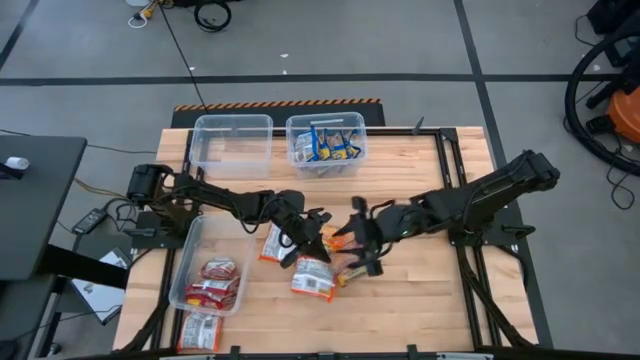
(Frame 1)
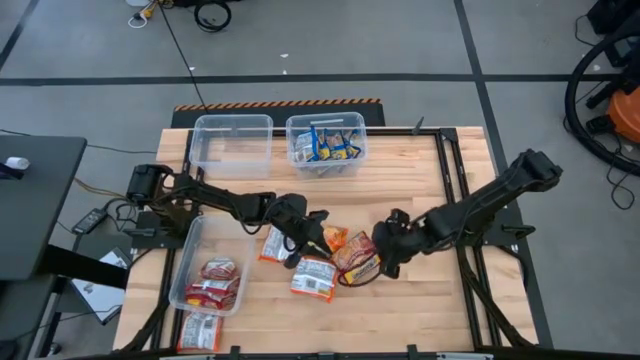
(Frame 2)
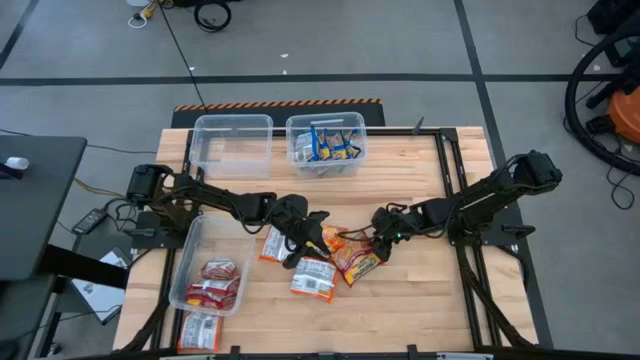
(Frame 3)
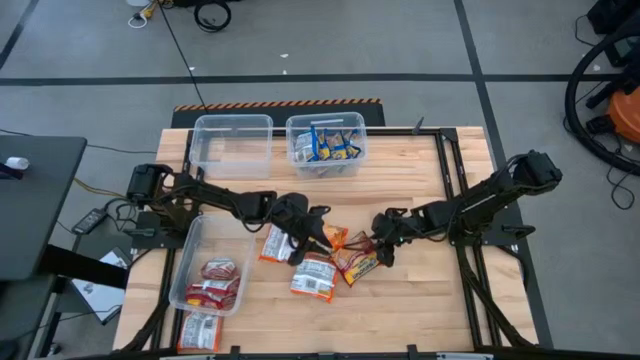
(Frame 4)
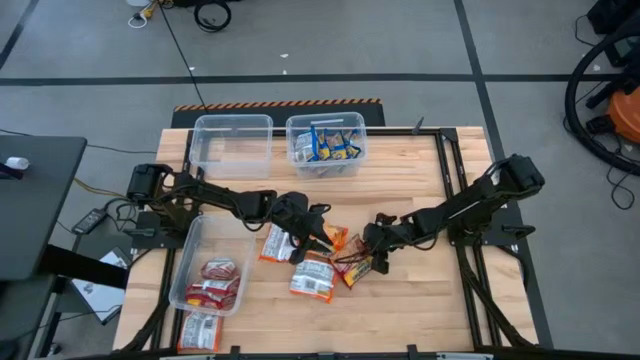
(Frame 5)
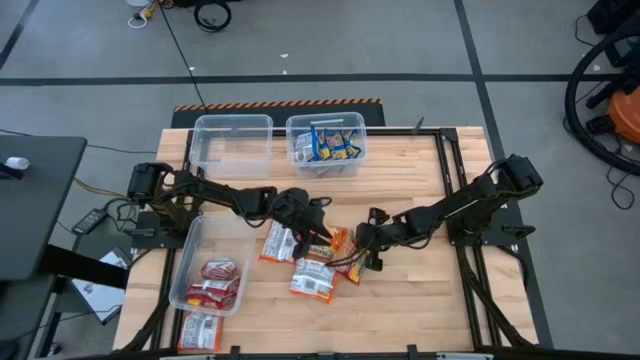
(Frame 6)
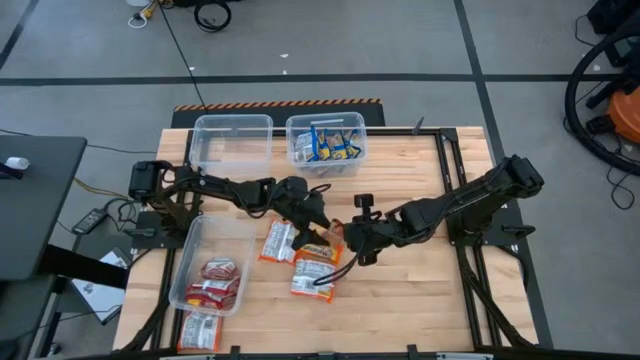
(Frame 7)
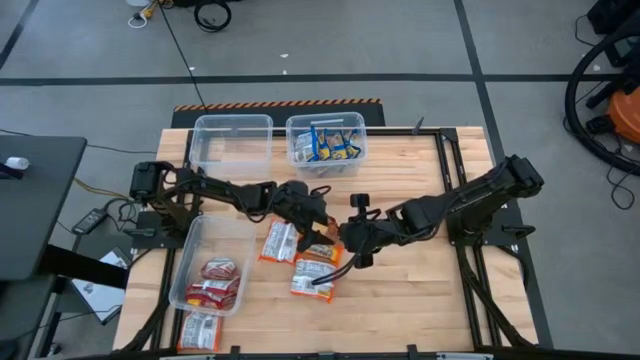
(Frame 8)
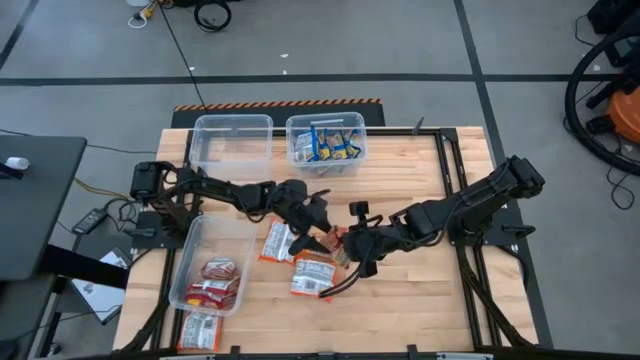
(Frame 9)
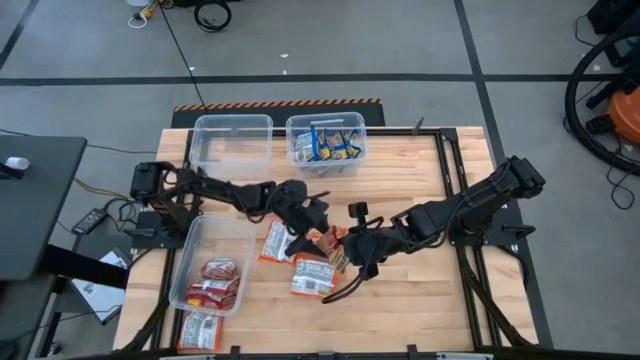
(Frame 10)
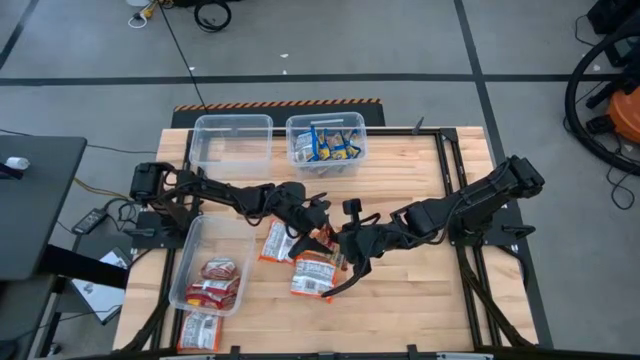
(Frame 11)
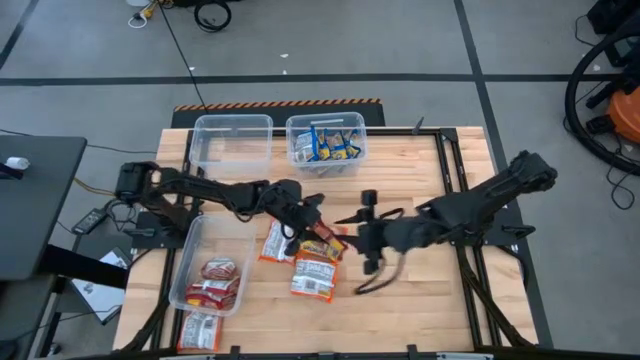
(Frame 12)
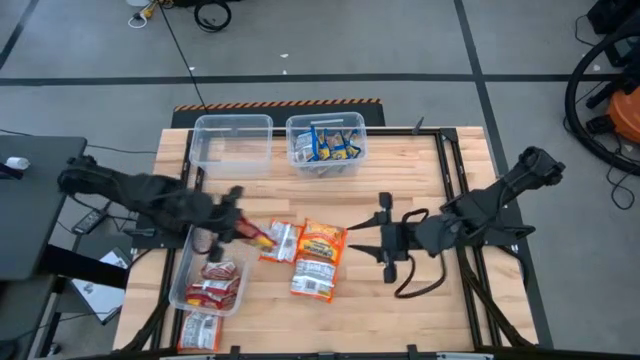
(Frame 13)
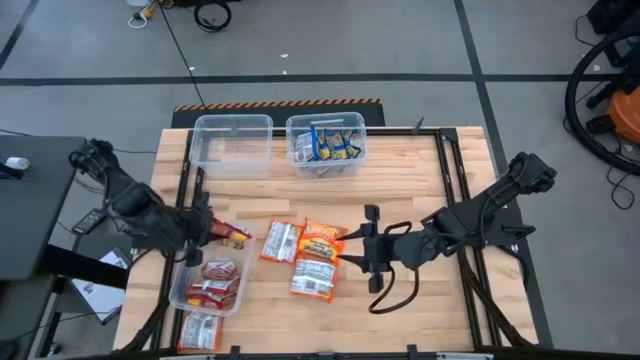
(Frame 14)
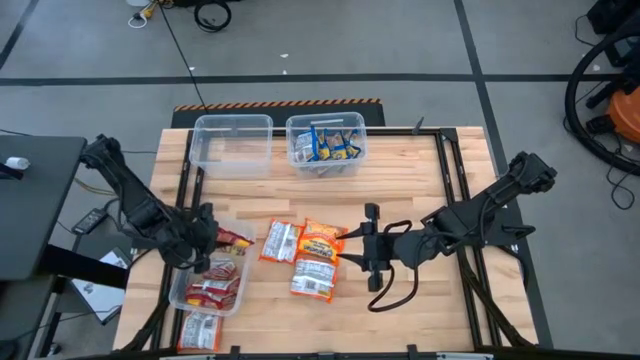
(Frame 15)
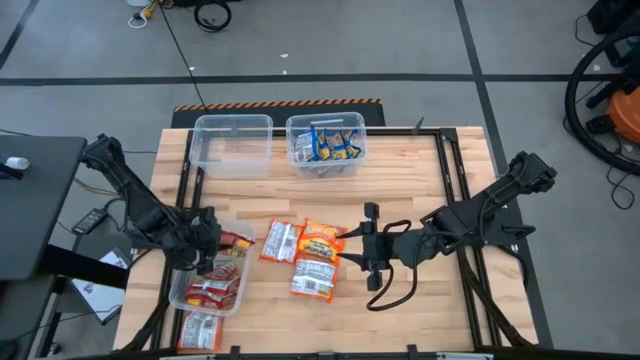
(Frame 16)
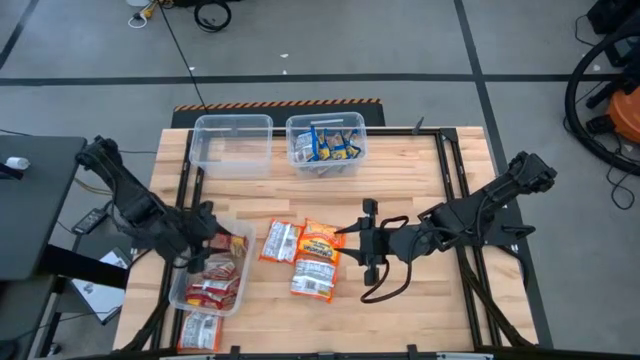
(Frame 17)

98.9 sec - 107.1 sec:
Task: Sort Maruchan noodles
Put the red noodle pack into the bottom left transparent bin

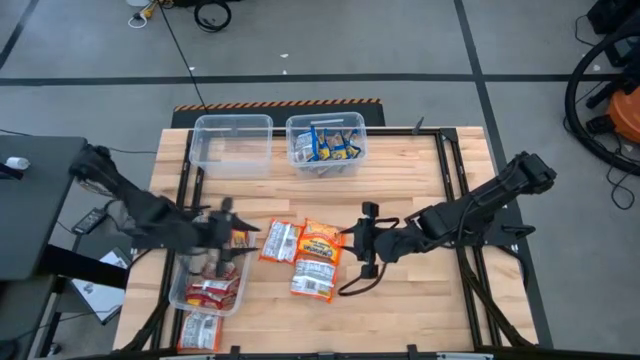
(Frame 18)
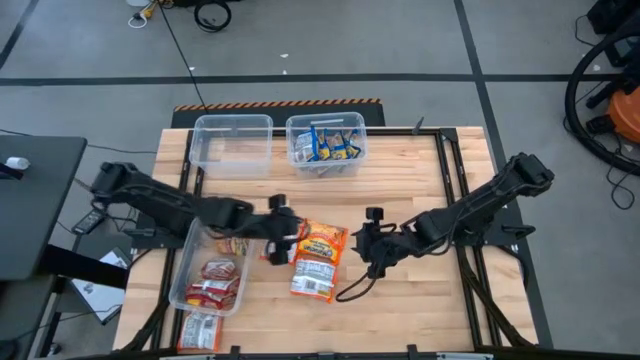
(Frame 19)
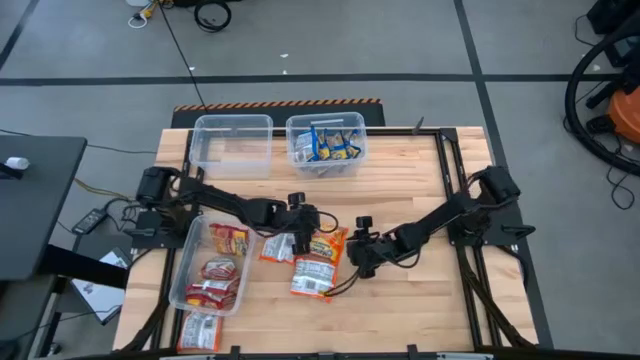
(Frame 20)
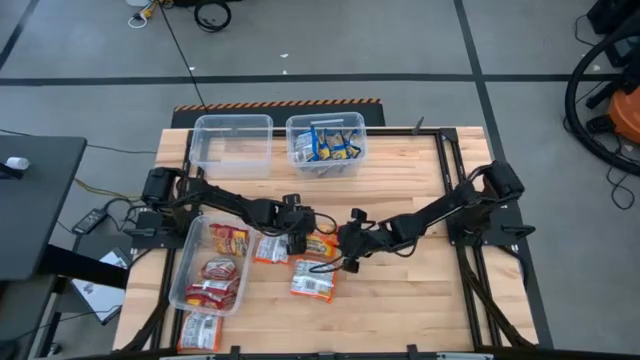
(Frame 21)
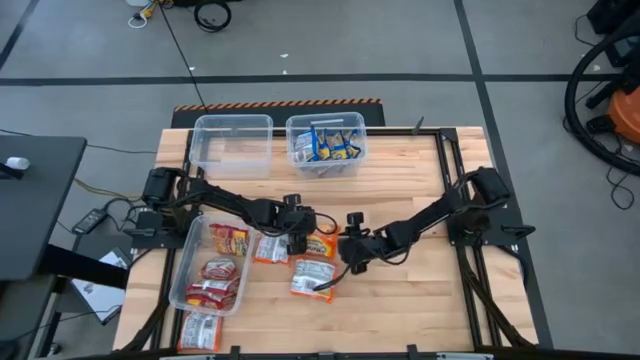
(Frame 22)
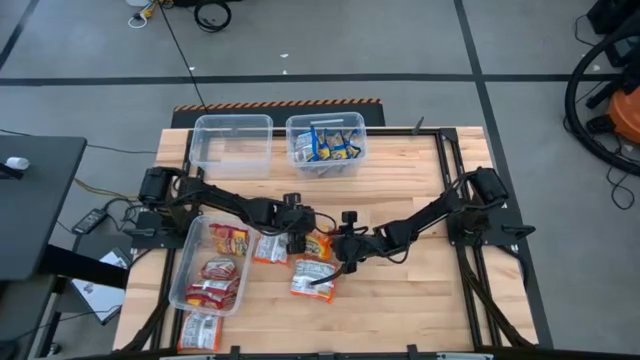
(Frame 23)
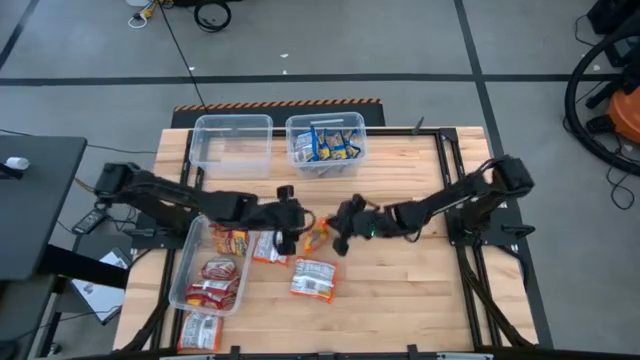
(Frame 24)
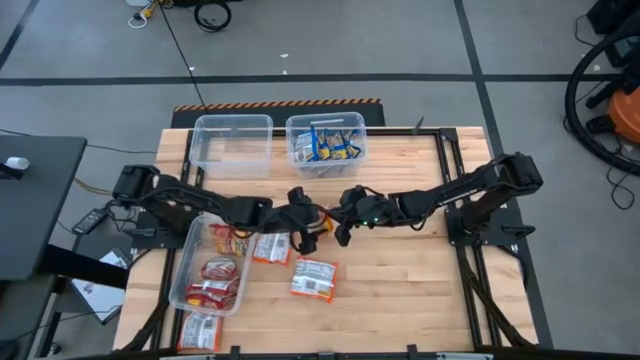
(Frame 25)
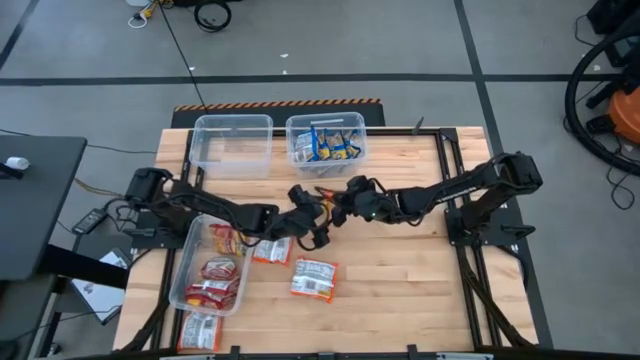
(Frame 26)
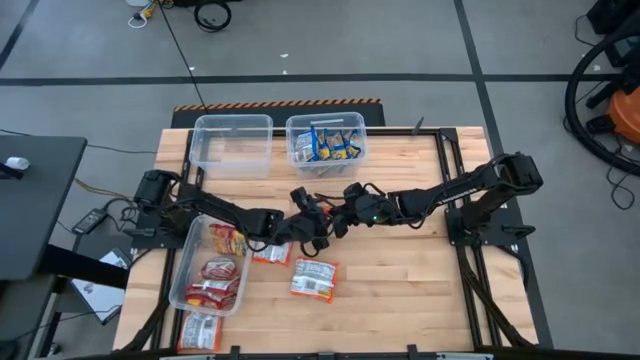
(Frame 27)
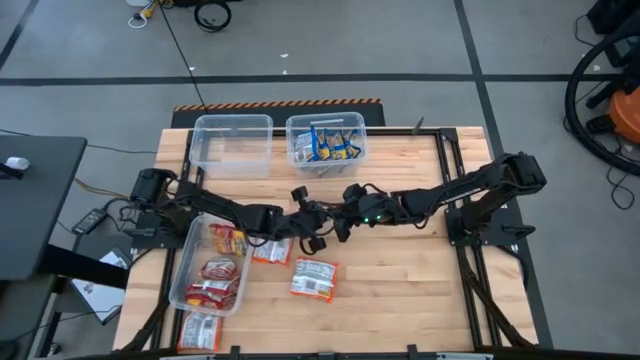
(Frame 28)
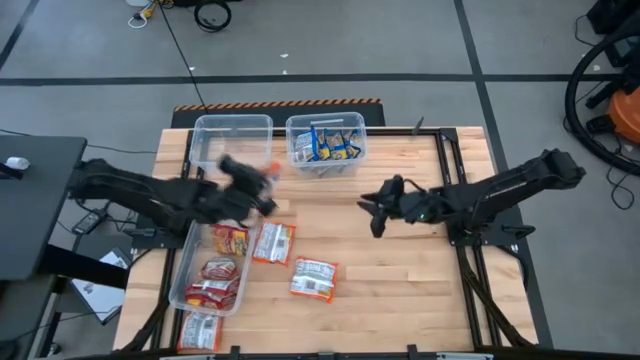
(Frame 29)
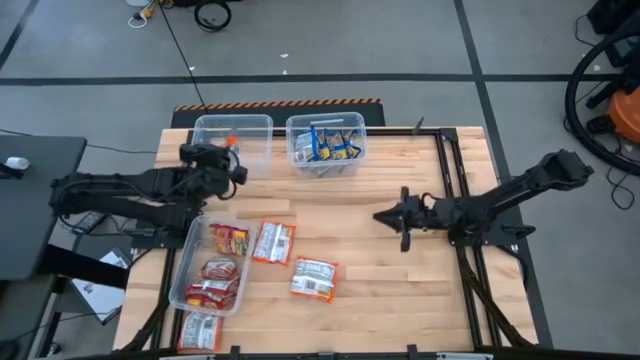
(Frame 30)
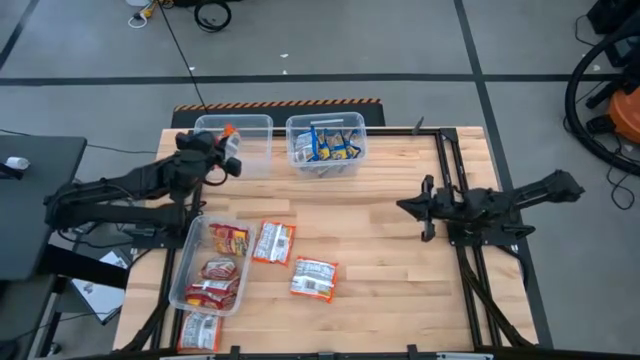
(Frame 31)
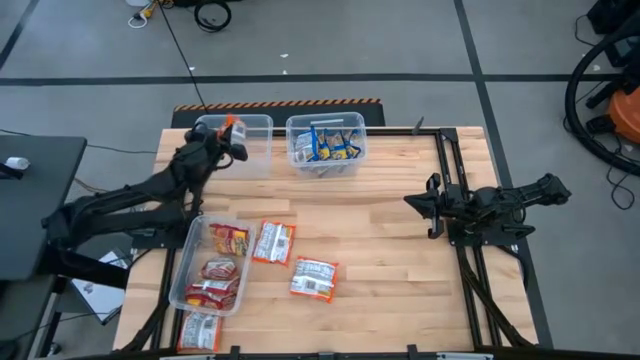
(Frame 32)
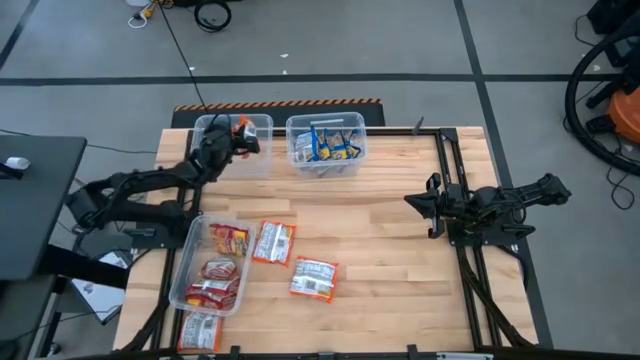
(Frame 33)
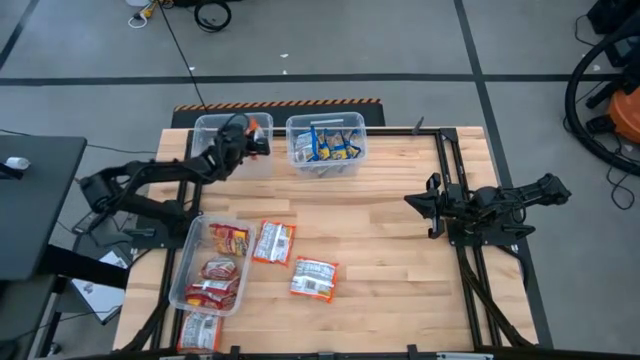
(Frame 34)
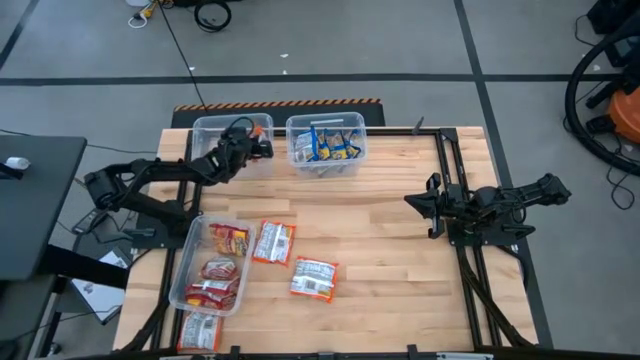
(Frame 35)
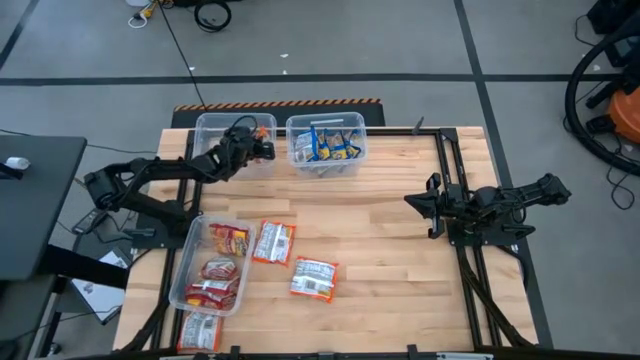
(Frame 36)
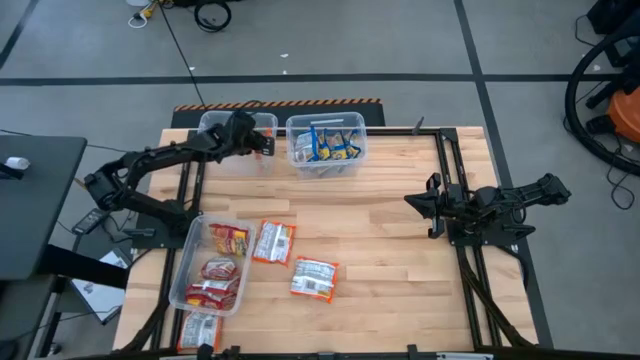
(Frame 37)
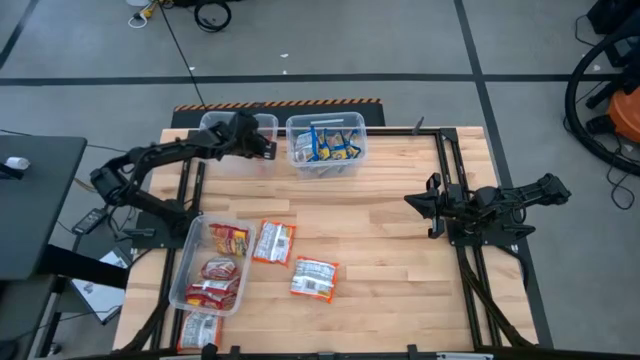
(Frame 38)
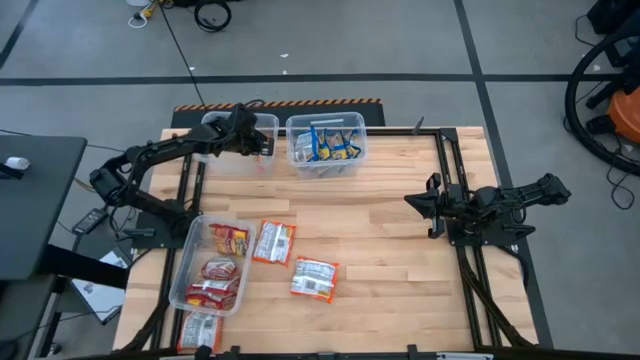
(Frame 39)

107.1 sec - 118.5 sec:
Put the top right orange noodle pack into the top left transparent bin

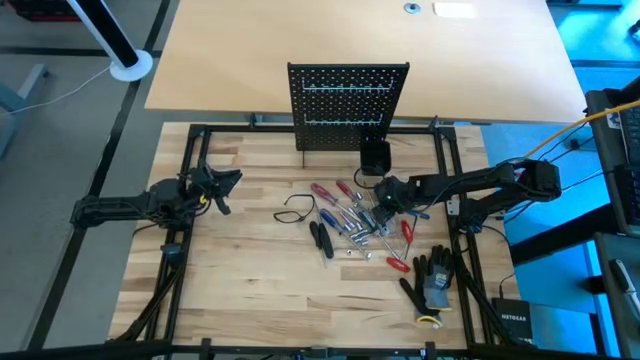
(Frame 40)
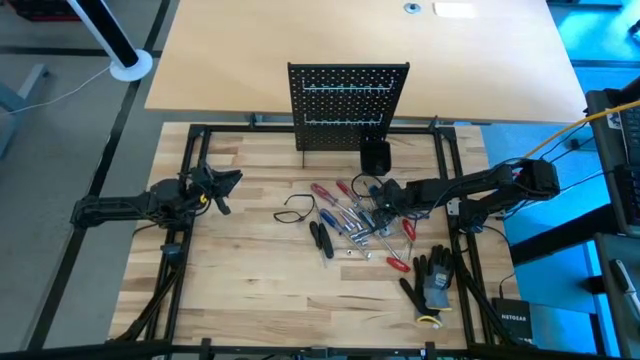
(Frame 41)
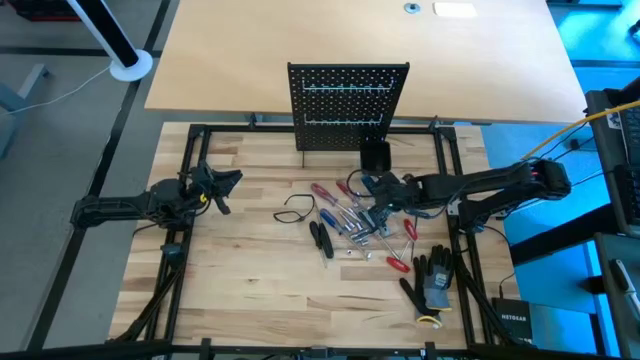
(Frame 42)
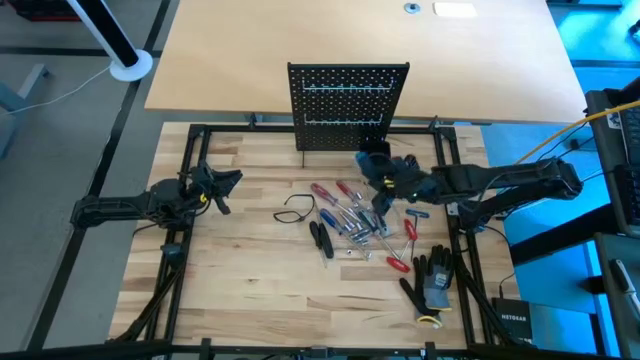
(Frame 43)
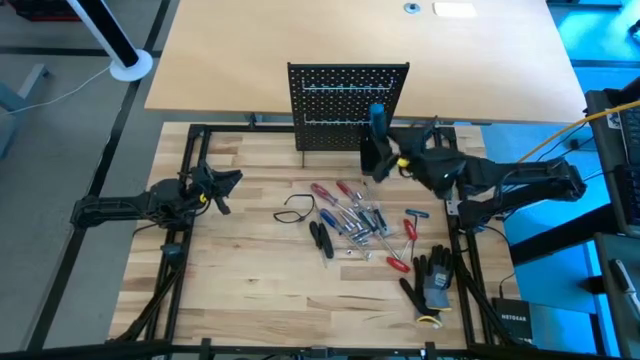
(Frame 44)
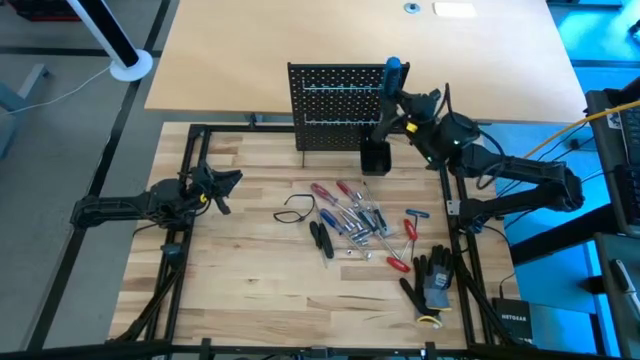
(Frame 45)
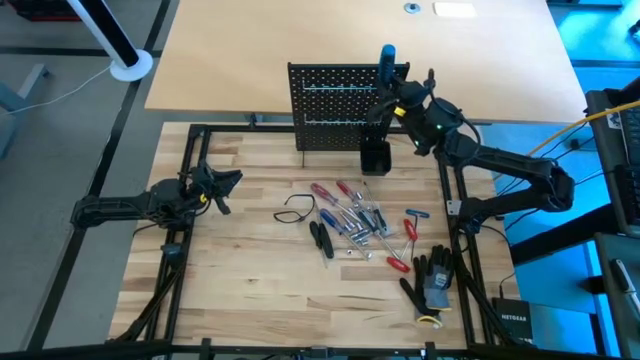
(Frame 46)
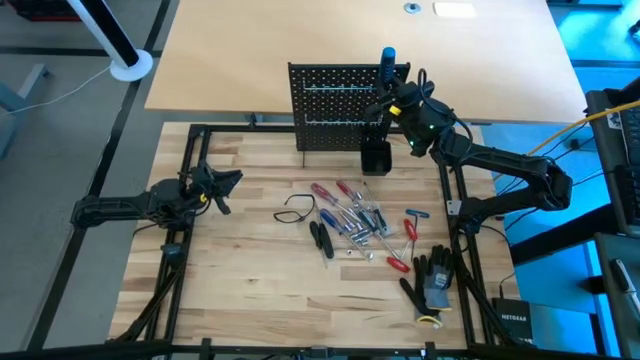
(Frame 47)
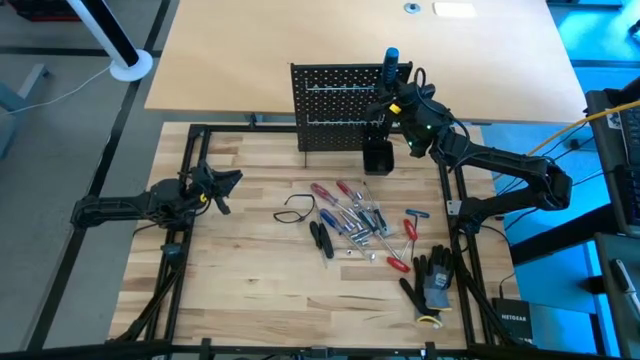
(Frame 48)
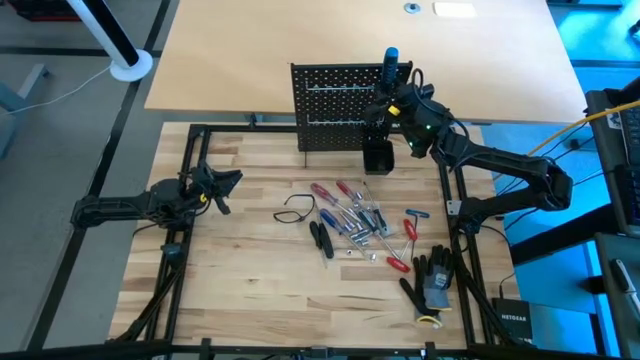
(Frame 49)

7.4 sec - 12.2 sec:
Task: Hang tools onto peg board
Hang the blue screwdriver on the peg board
